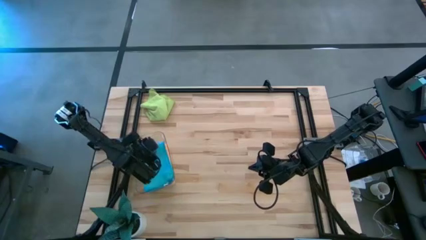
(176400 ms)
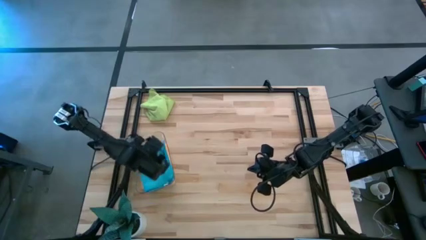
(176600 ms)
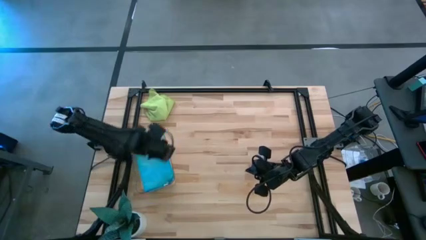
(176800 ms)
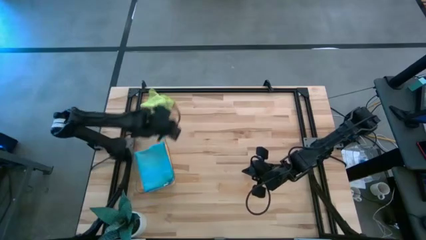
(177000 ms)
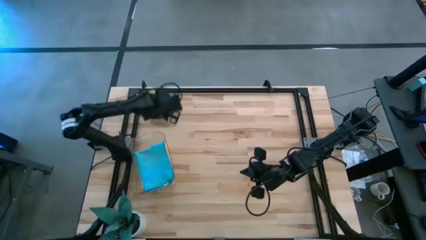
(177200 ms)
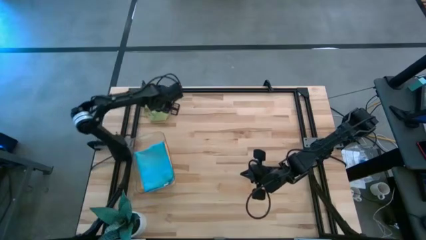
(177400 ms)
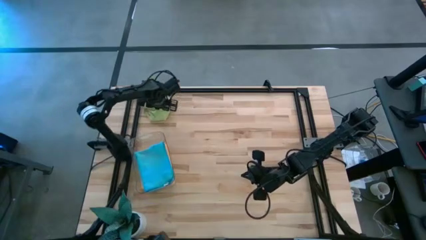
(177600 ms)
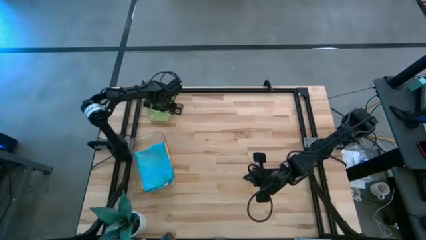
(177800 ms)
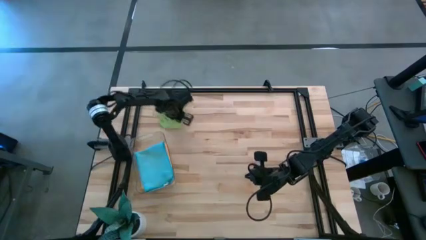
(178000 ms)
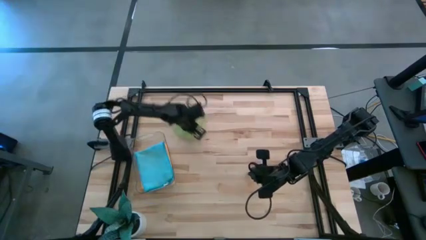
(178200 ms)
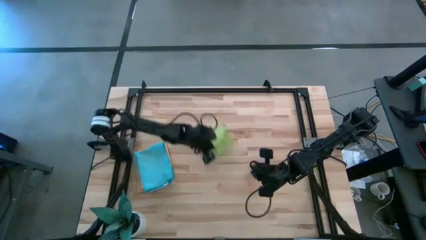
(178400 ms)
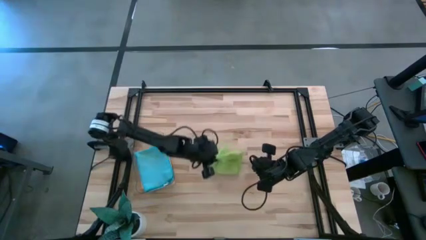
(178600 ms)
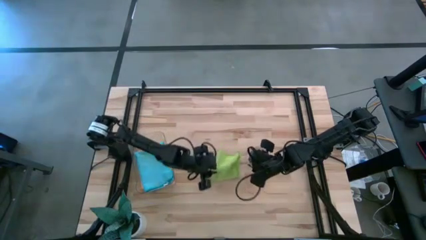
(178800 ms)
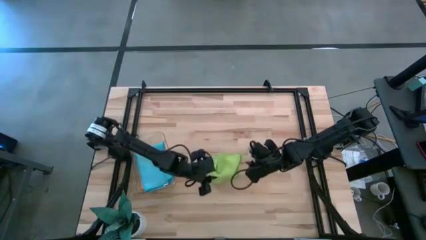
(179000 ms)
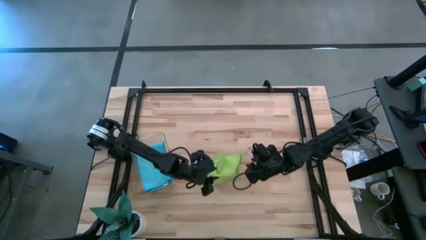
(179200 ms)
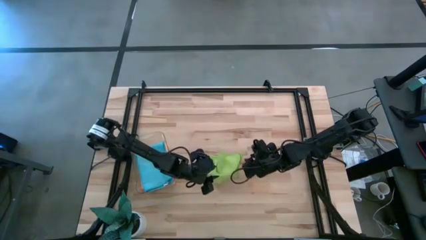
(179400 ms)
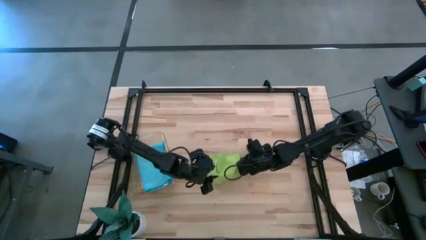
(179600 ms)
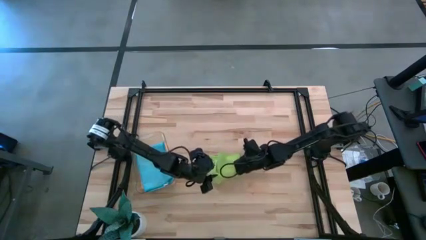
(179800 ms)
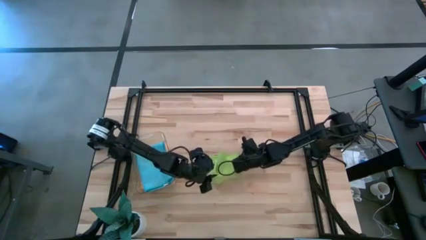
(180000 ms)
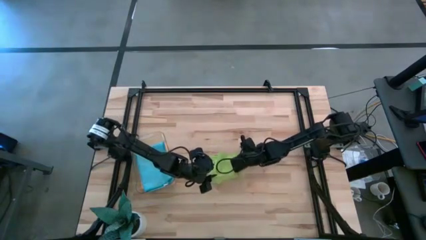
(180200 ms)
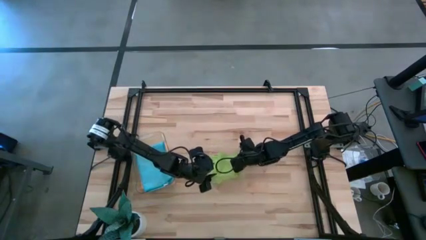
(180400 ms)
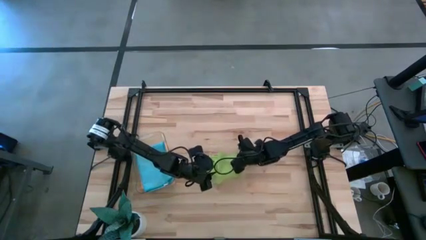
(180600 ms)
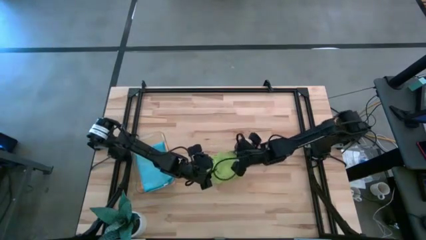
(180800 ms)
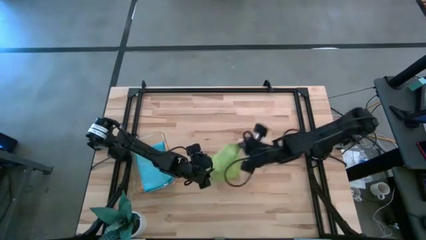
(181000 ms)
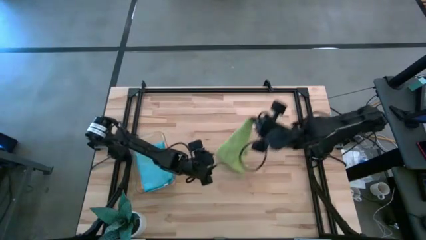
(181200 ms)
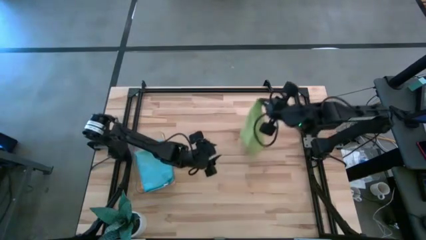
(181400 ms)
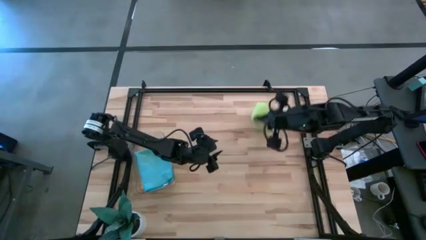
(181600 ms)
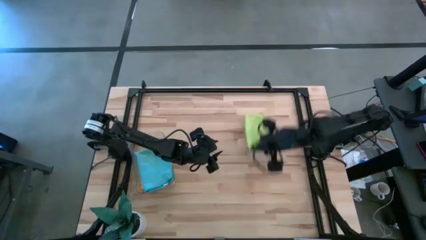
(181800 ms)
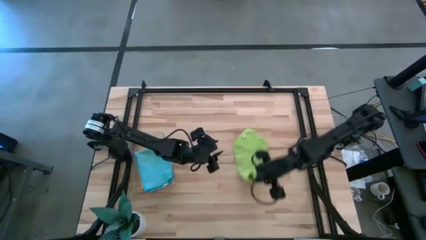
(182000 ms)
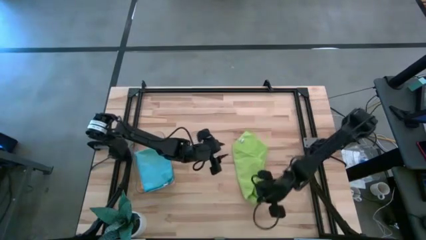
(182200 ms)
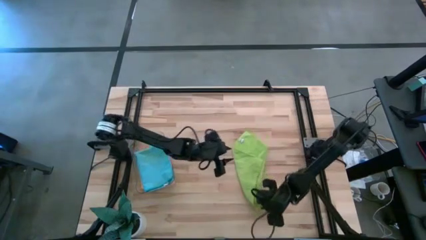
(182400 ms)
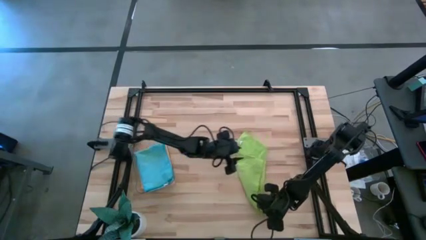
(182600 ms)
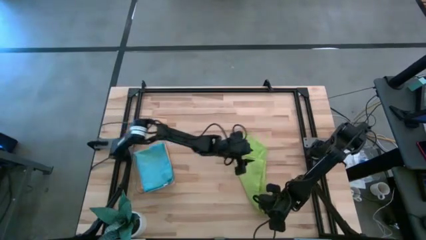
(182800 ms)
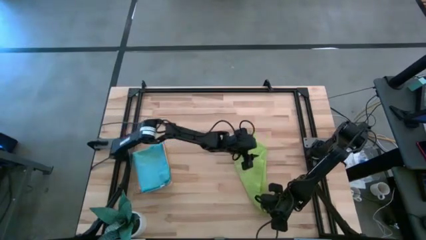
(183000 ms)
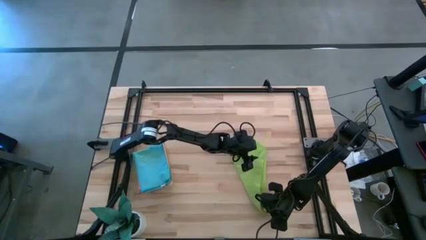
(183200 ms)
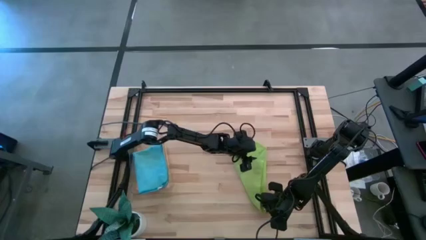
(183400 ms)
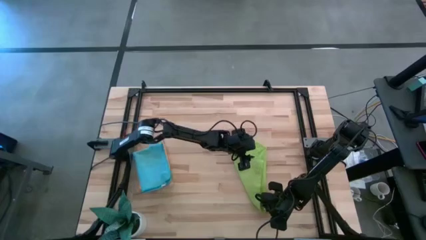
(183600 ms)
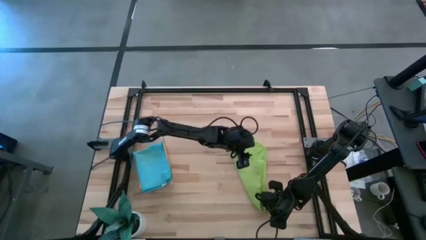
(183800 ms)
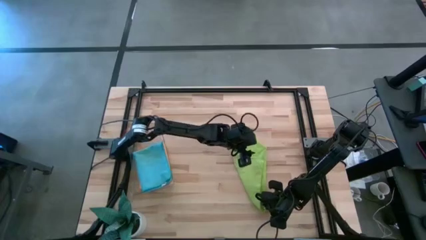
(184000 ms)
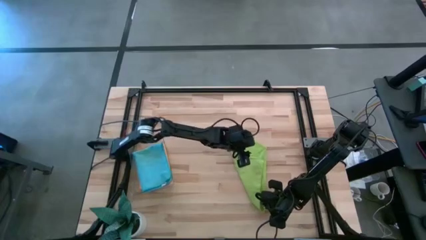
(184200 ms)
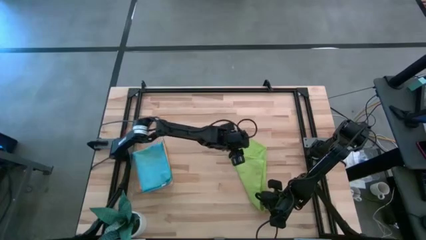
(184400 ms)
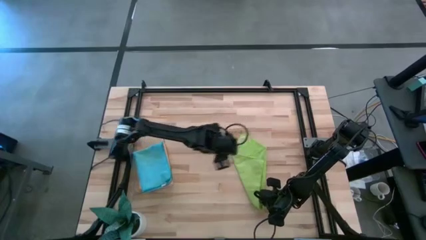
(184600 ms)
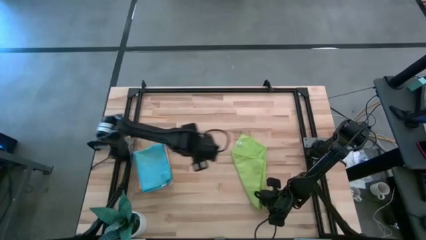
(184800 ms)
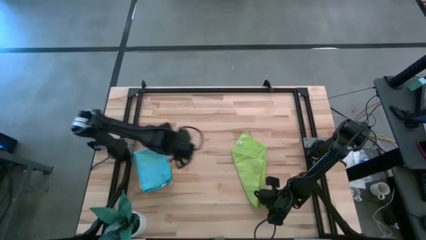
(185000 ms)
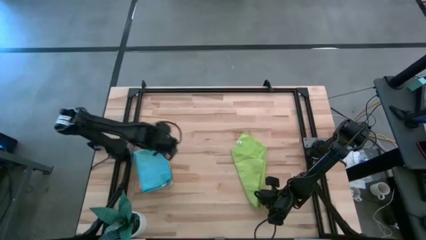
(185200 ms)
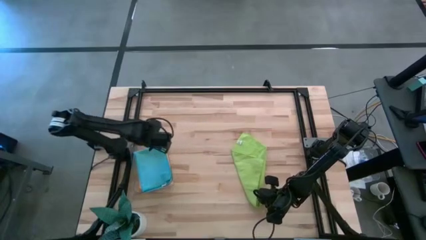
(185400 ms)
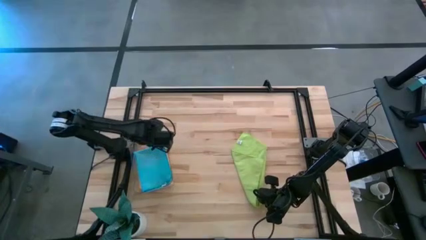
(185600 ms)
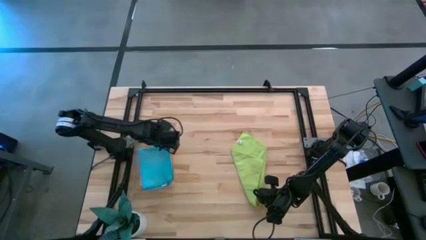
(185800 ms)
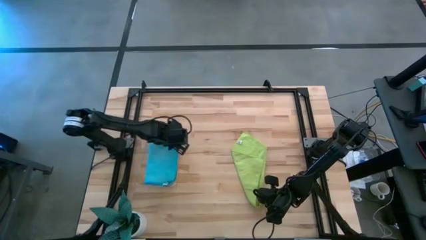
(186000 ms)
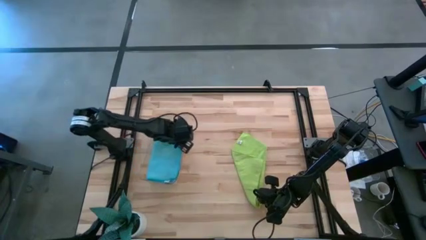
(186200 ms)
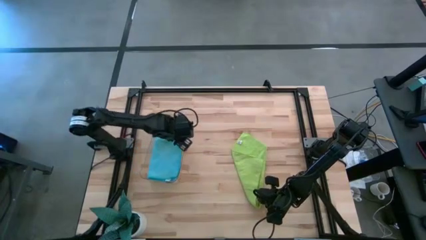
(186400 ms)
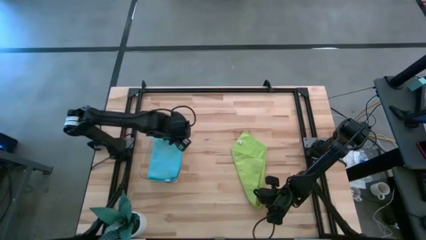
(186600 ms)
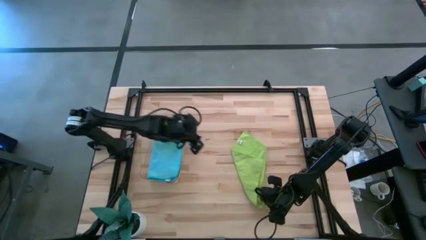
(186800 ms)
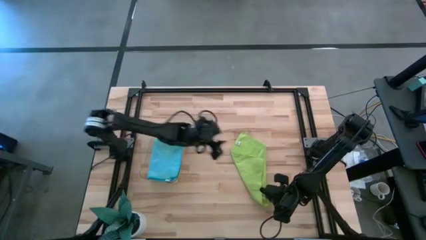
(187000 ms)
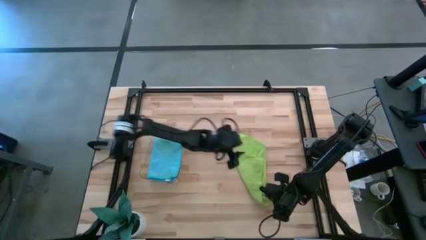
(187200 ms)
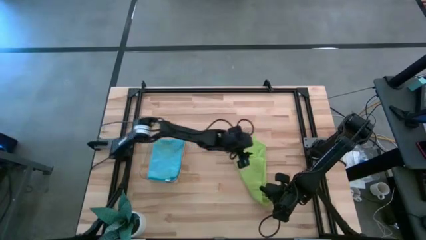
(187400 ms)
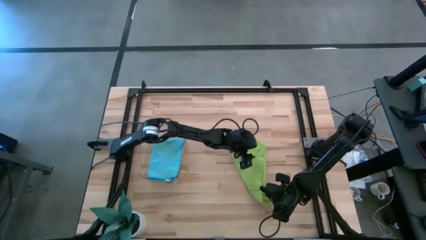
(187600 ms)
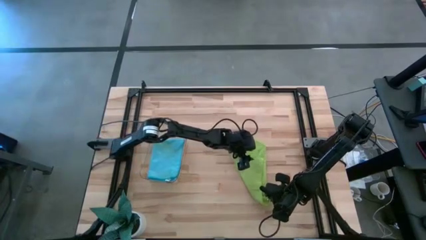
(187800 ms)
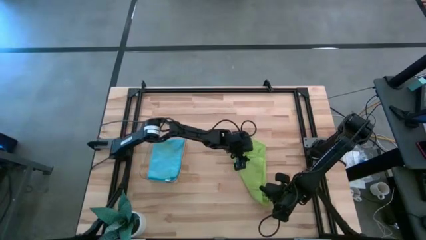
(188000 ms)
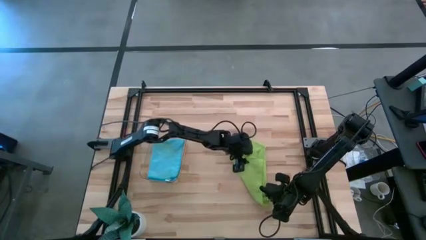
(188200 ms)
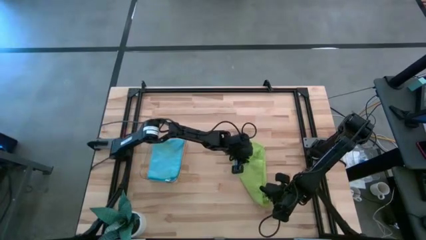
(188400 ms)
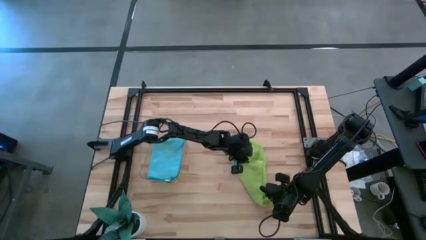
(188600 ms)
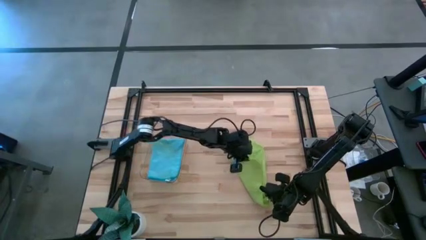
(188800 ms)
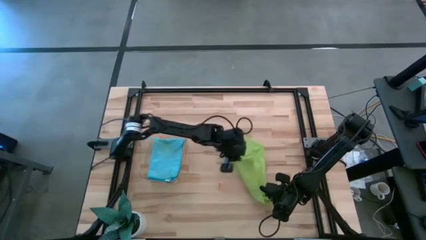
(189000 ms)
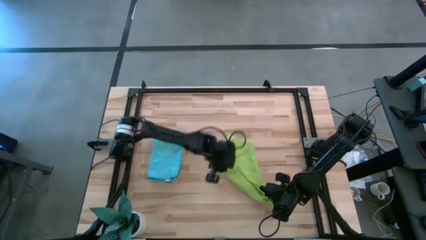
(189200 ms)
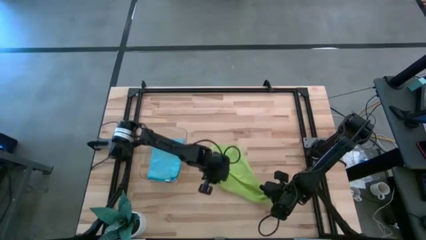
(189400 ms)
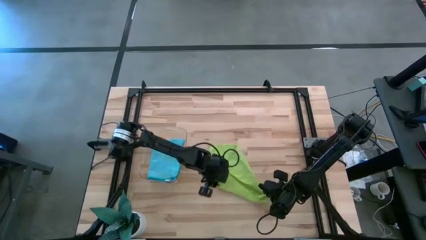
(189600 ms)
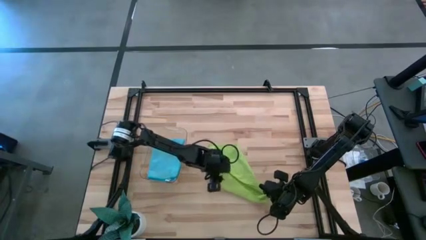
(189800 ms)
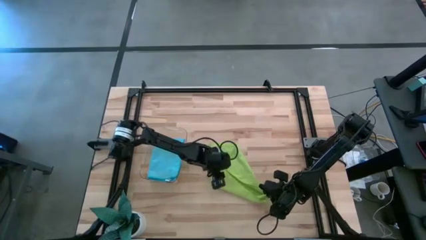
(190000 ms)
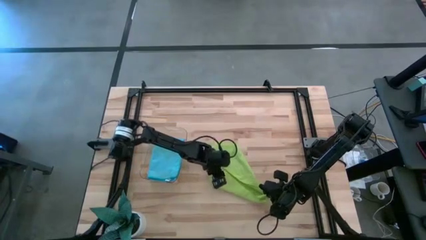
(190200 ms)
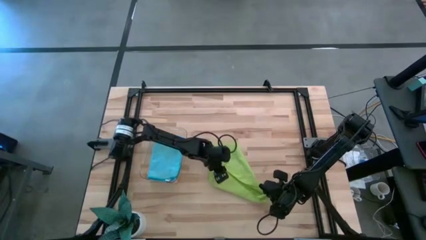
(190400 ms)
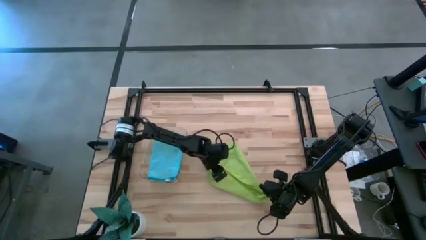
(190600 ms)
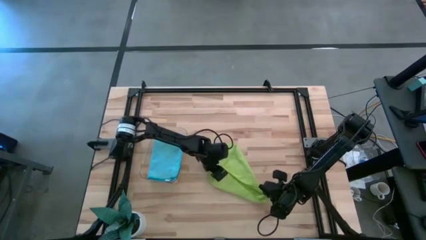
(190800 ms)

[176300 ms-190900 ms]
Task: Fold microfiber towels
Fold the green microfiber towel on the table
